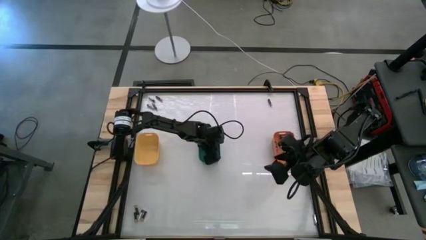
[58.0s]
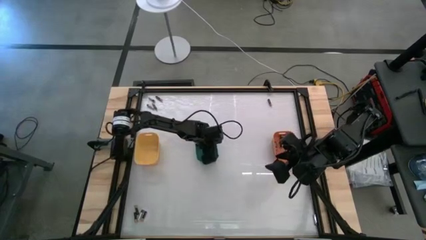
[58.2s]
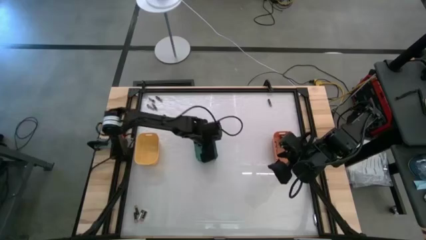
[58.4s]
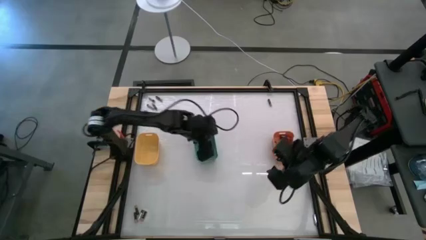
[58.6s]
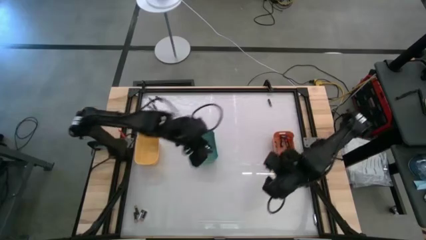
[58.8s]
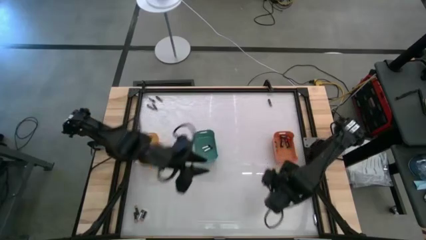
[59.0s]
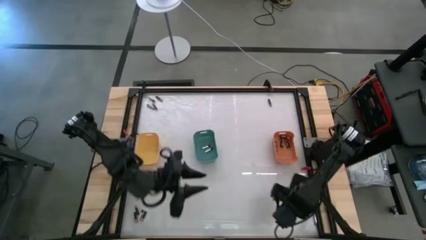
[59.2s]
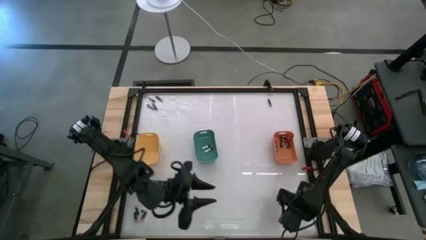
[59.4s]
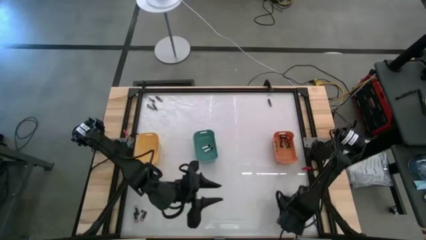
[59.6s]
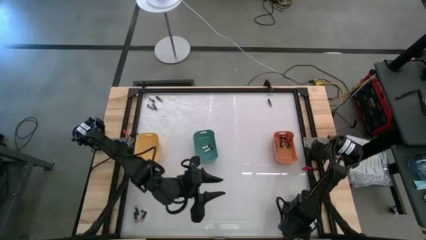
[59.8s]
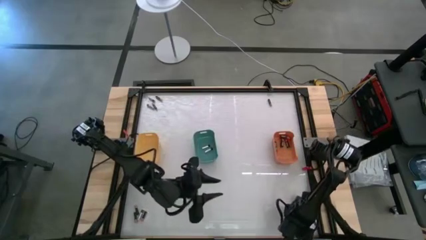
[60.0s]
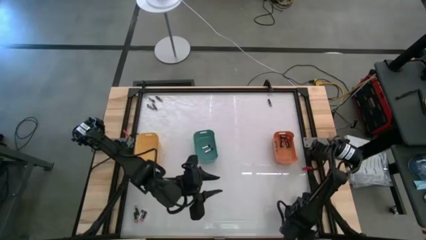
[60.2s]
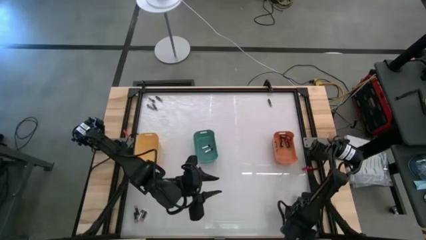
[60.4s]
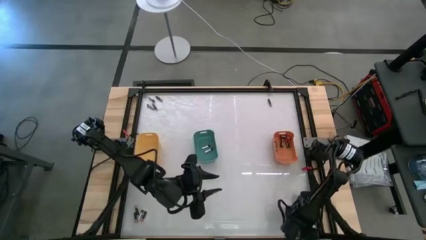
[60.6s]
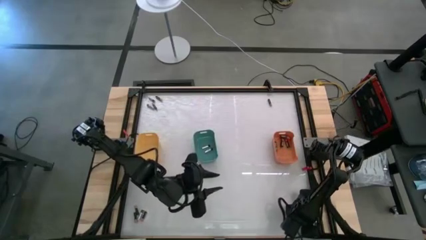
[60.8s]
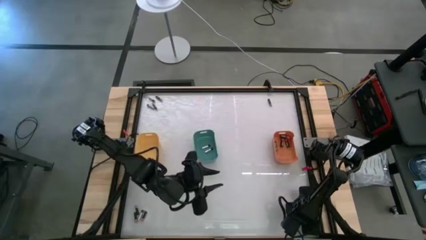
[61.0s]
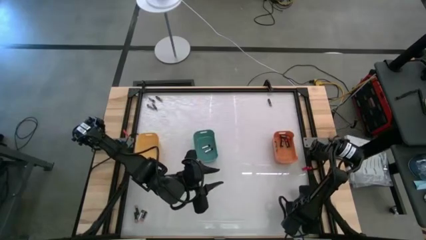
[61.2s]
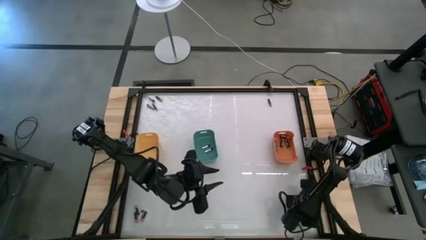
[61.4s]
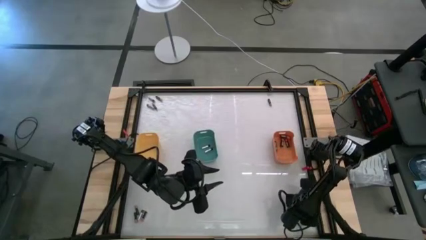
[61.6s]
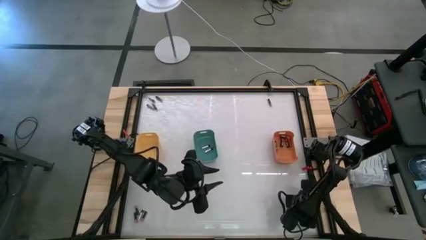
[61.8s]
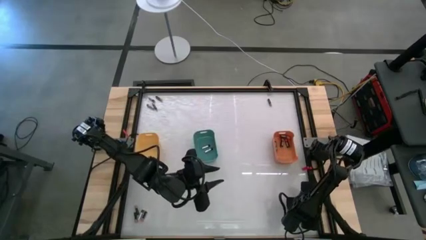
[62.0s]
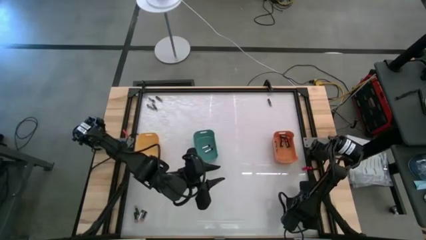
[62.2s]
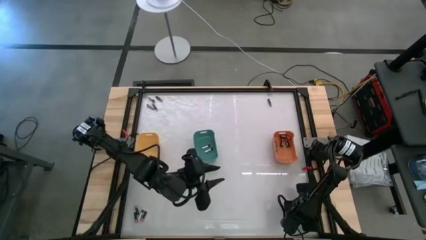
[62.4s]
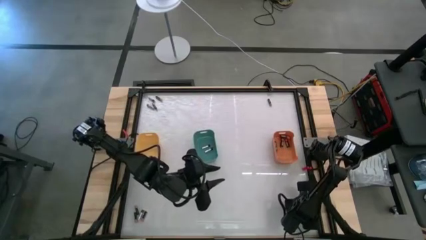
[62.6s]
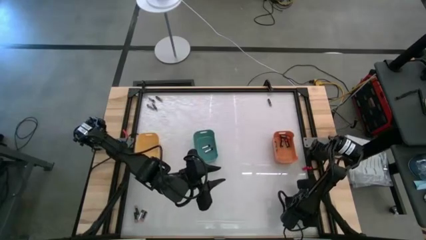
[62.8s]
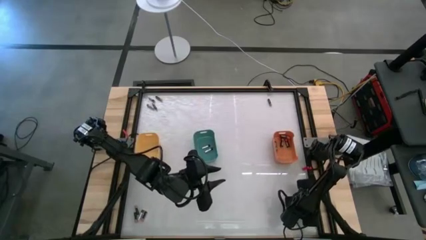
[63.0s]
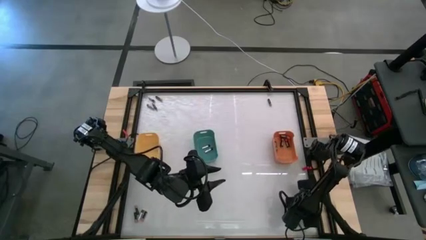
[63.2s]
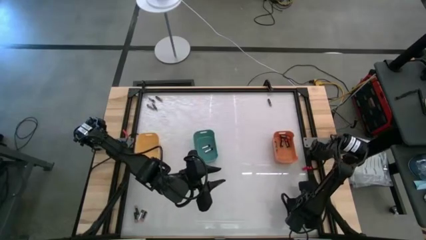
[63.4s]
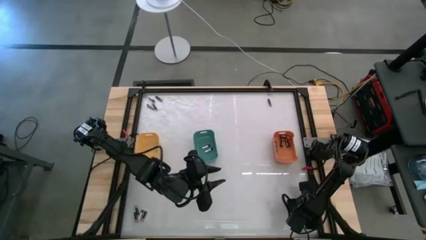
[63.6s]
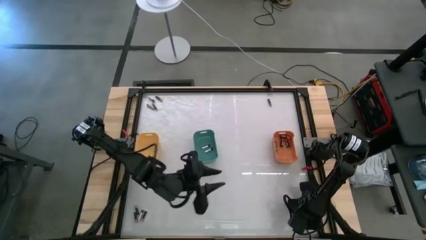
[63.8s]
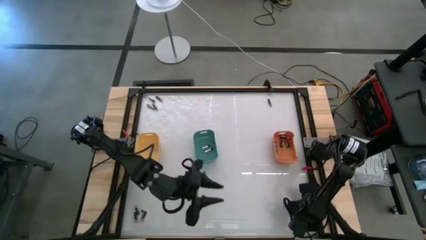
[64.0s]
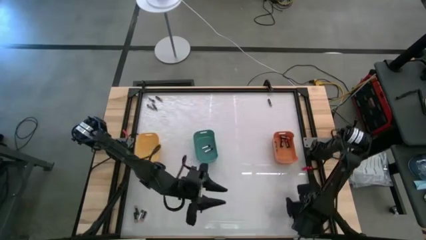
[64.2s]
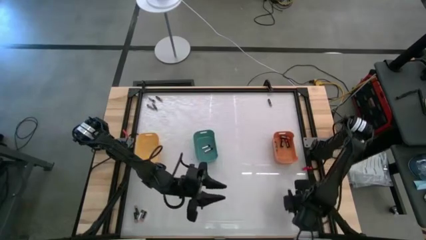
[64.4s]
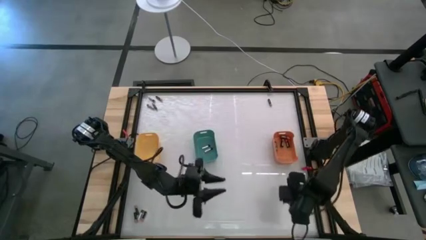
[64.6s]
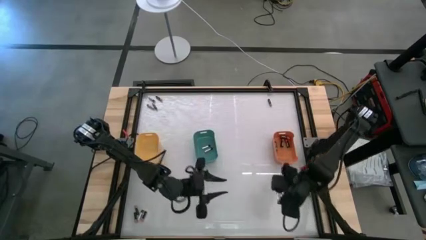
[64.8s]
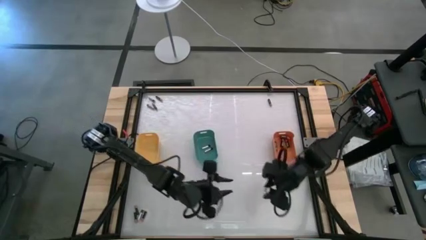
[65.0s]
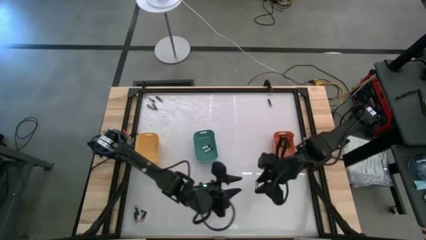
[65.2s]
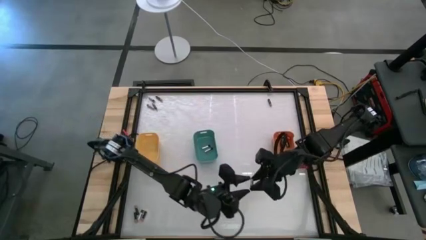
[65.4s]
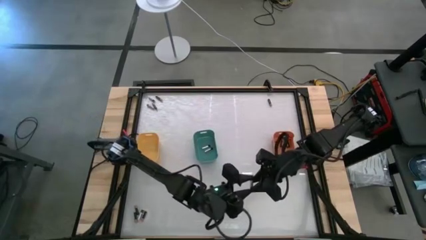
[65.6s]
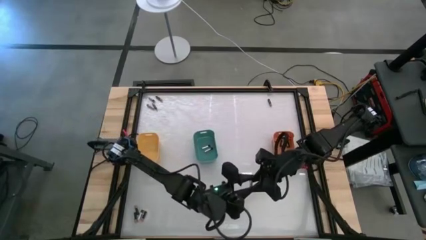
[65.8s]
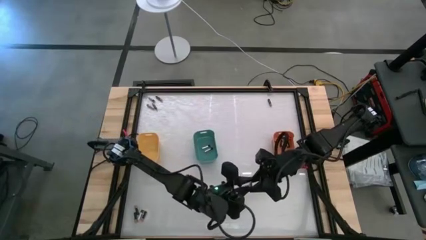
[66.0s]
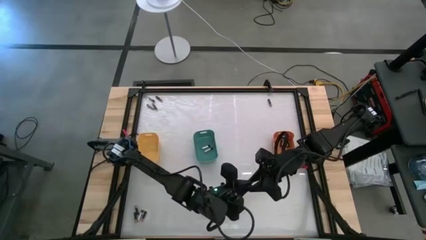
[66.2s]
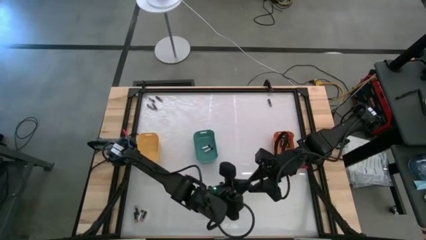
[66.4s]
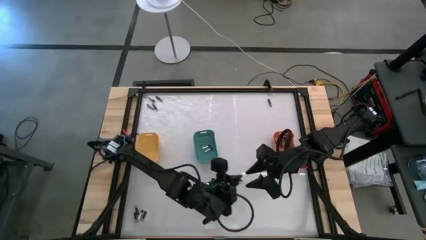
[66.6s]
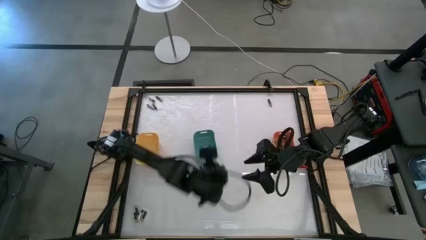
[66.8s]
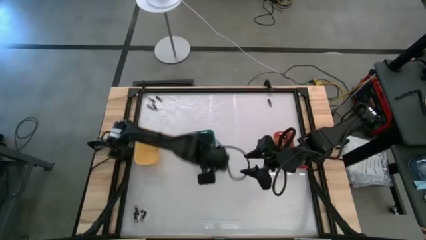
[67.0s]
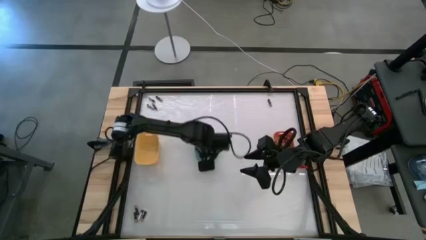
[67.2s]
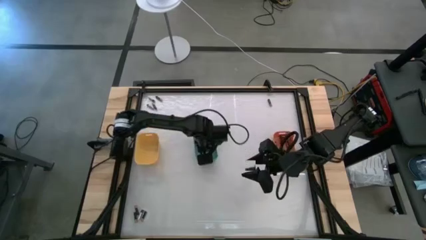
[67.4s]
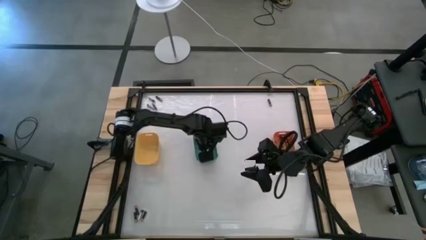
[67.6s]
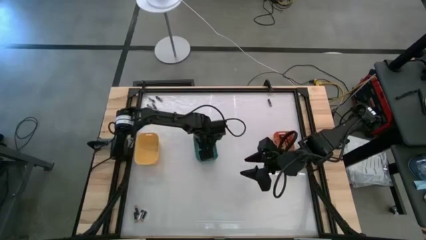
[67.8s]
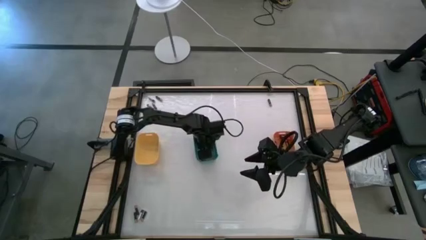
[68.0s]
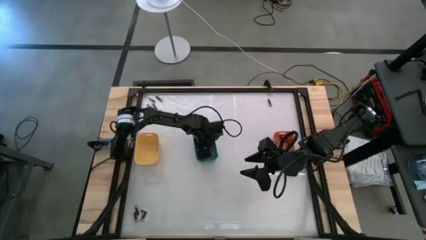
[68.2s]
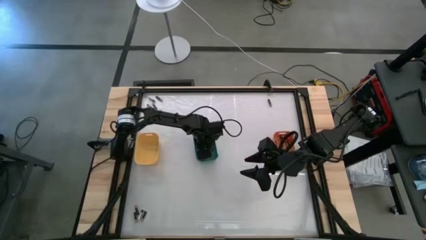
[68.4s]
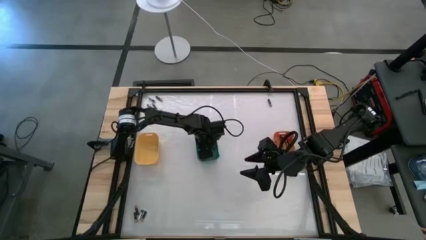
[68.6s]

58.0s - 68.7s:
Task: Sort batteries
Put the silver battery into the green bin

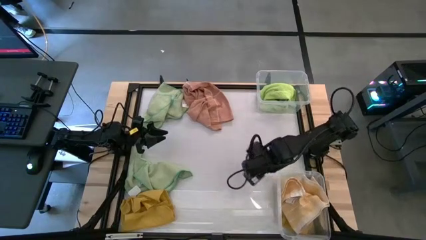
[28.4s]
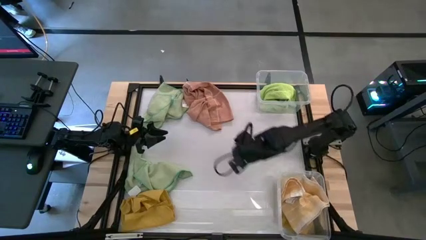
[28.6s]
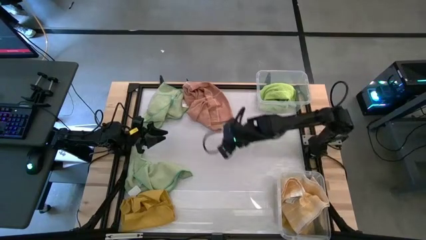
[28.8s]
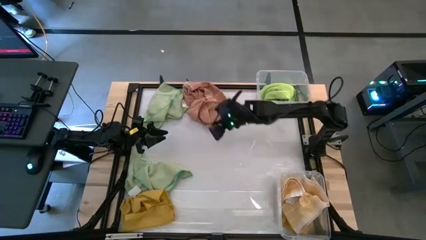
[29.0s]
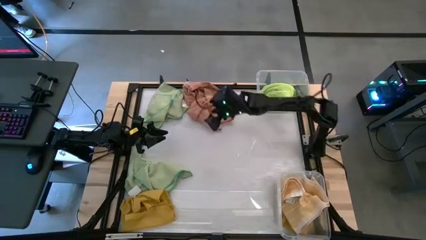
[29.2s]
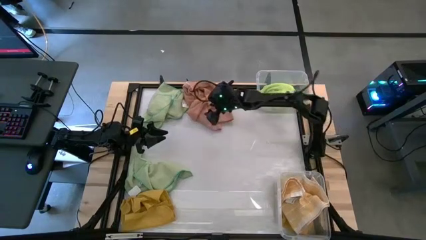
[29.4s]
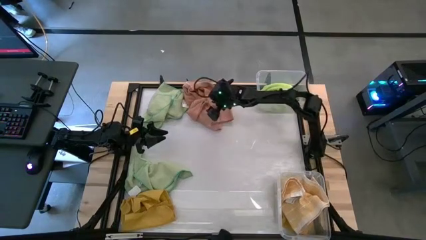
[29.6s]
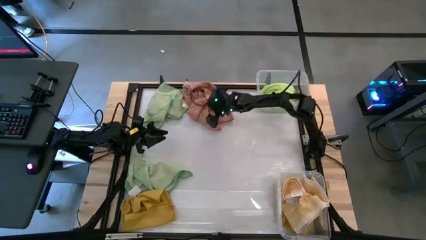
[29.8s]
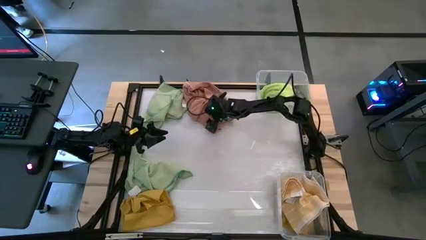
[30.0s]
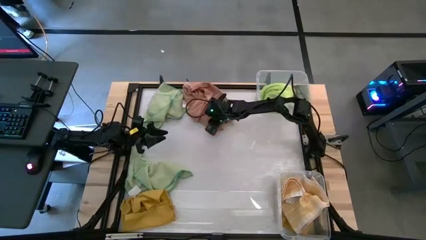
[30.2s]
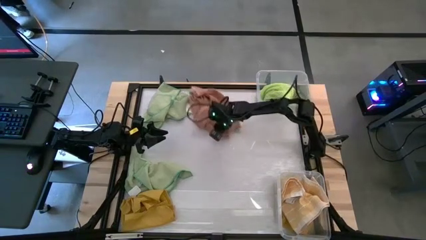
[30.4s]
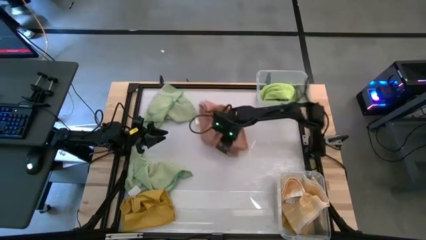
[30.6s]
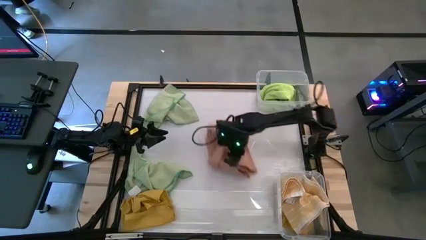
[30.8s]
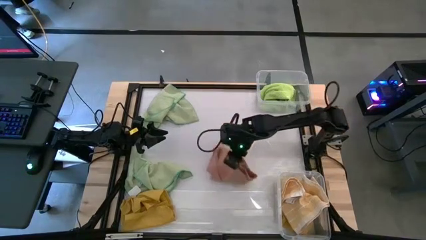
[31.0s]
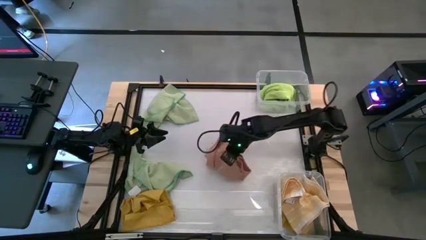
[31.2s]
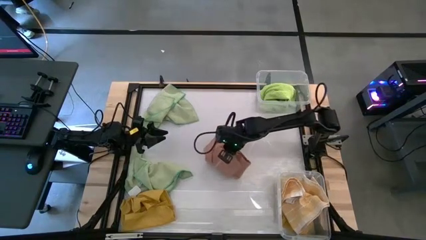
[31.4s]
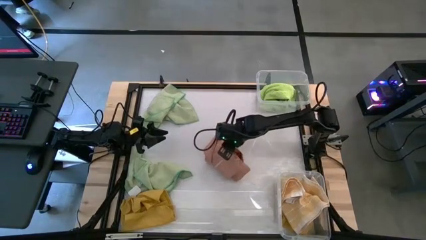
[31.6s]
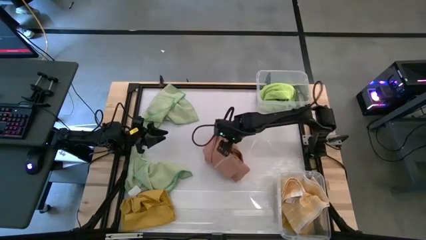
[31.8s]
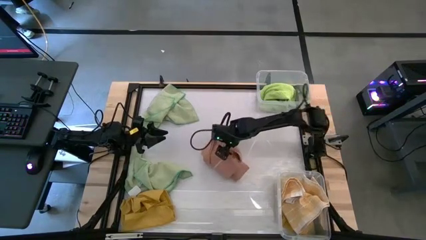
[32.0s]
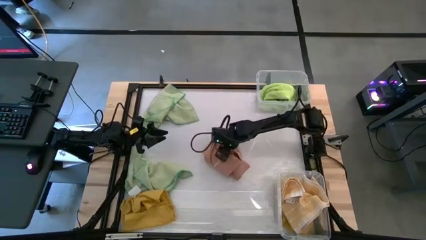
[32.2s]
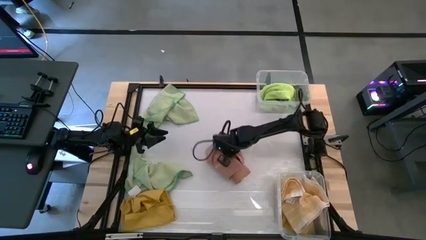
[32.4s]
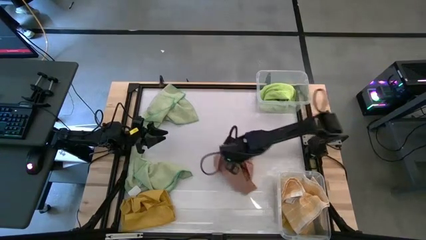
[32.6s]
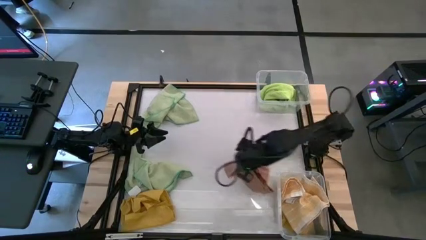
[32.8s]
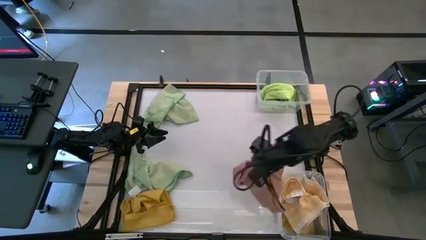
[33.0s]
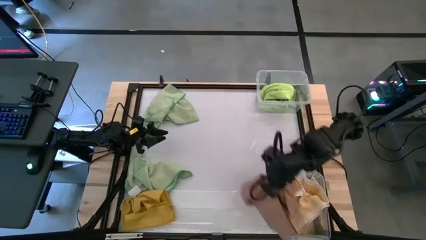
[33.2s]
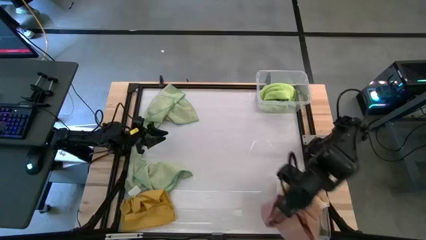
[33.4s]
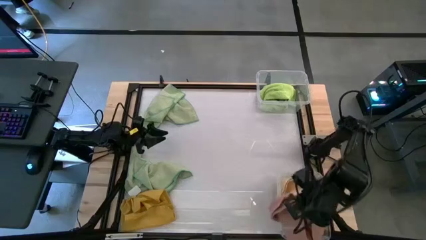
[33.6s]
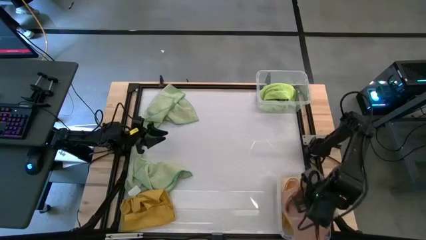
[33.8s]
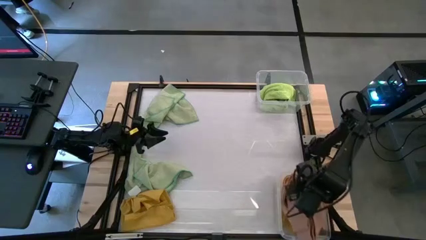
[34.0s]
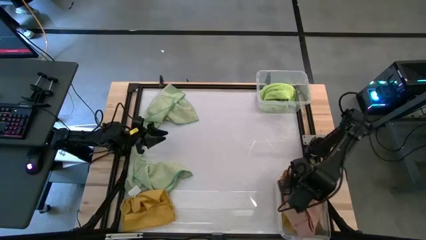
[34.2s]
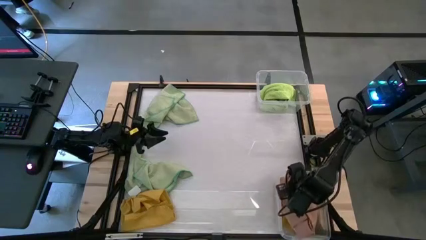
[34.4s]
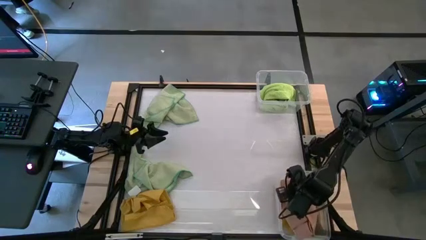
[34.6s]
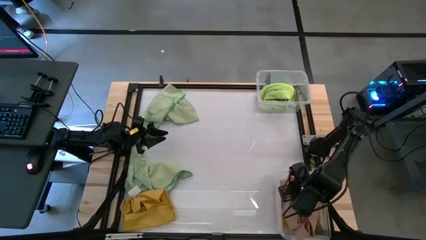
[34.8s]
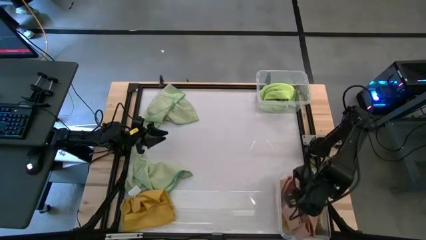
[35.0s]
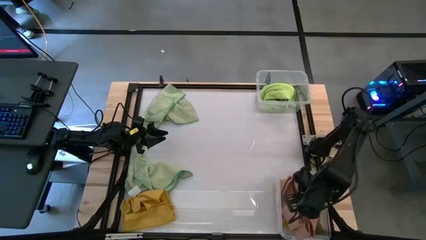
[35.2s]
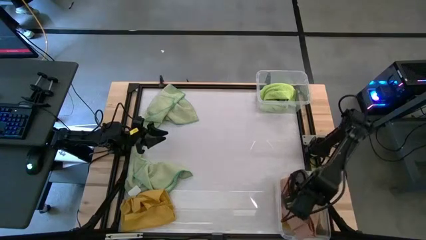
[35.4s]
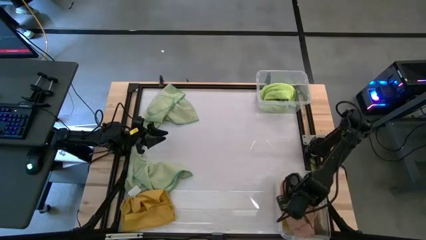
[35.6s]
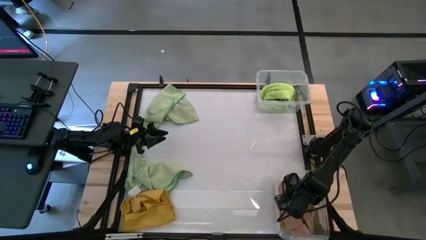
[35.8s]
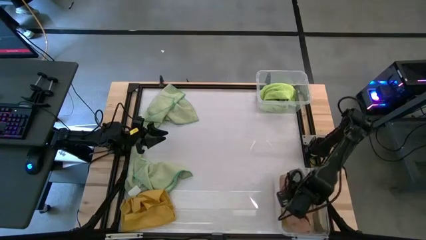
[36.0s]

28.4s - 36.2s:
Task: Sort towels by color in basket
Put the brown patterned towel into the bottom transparent bin
